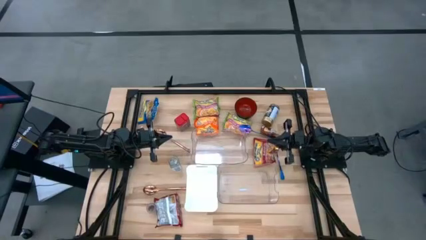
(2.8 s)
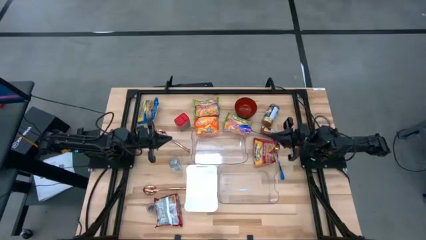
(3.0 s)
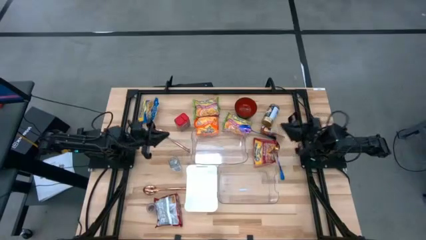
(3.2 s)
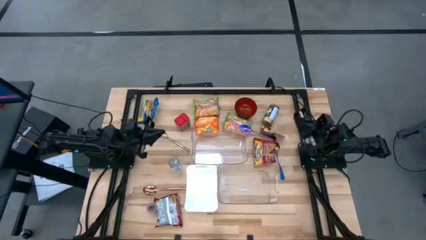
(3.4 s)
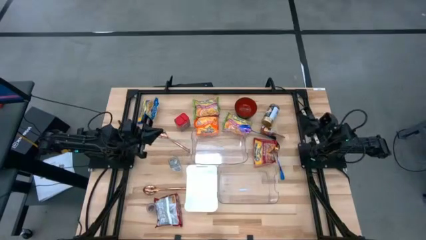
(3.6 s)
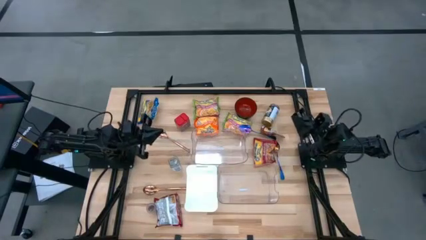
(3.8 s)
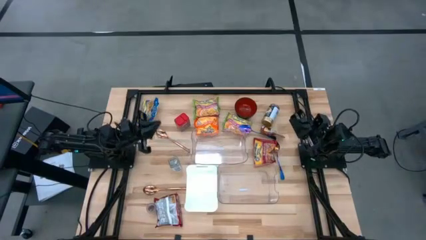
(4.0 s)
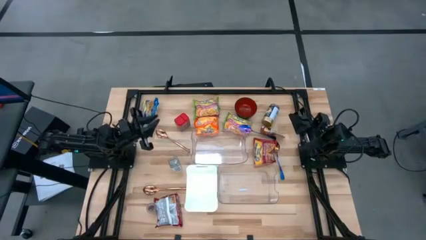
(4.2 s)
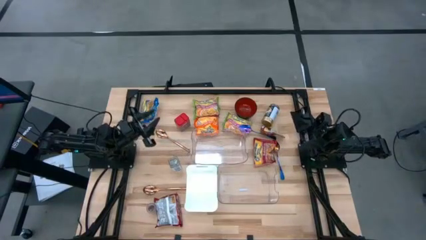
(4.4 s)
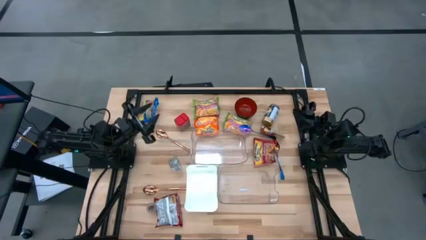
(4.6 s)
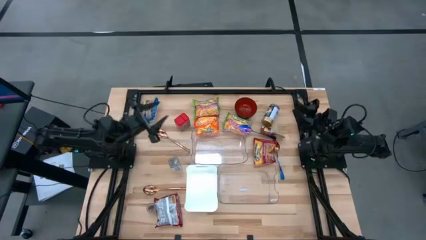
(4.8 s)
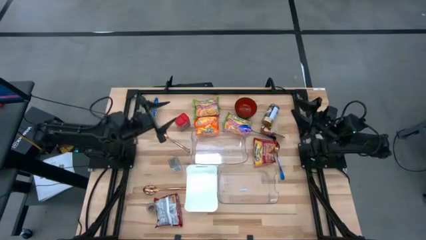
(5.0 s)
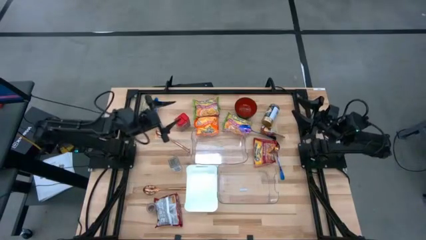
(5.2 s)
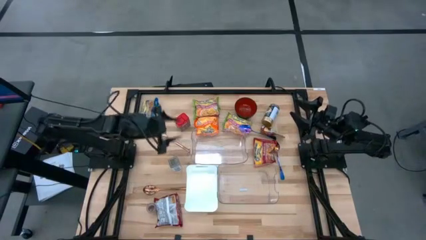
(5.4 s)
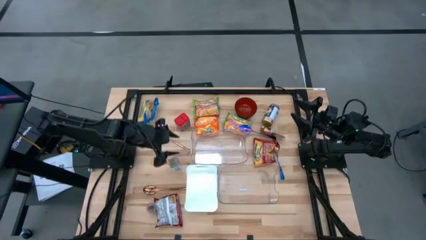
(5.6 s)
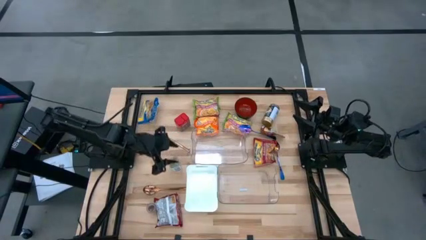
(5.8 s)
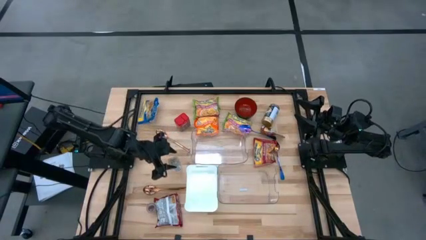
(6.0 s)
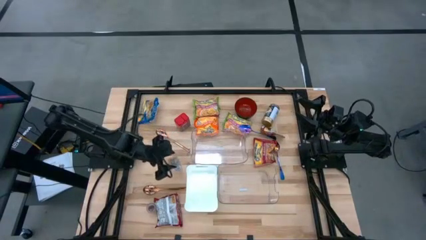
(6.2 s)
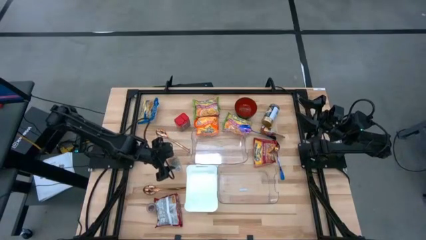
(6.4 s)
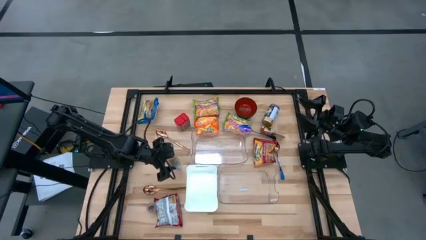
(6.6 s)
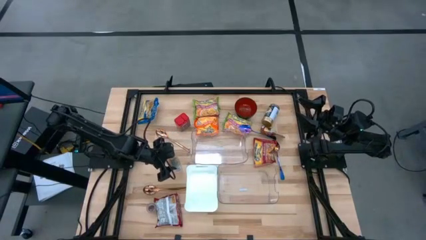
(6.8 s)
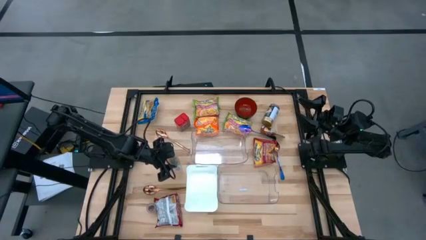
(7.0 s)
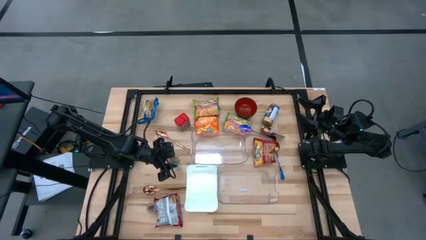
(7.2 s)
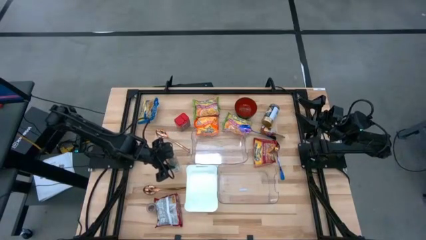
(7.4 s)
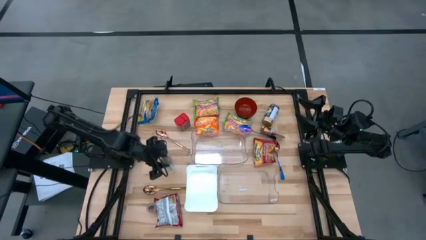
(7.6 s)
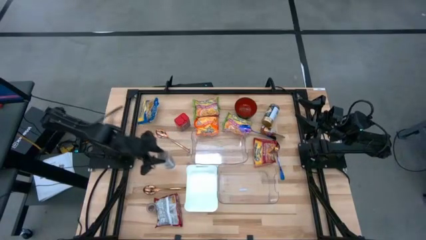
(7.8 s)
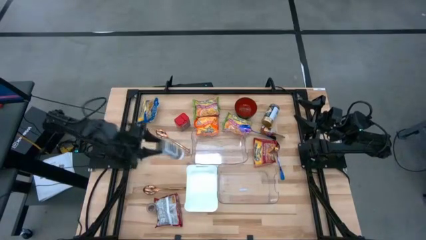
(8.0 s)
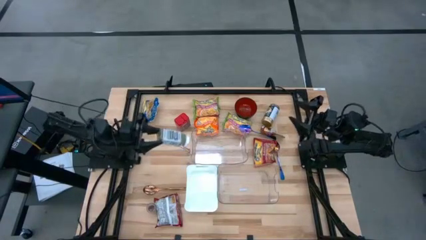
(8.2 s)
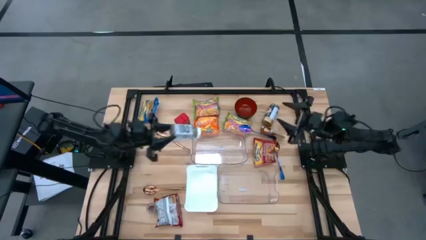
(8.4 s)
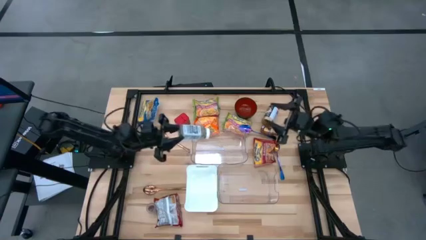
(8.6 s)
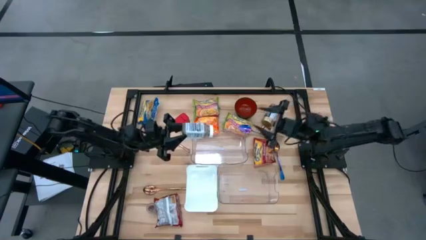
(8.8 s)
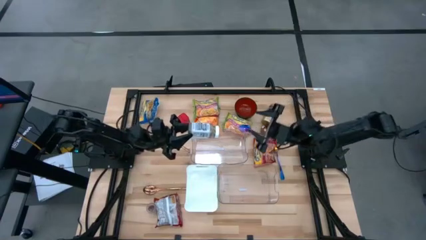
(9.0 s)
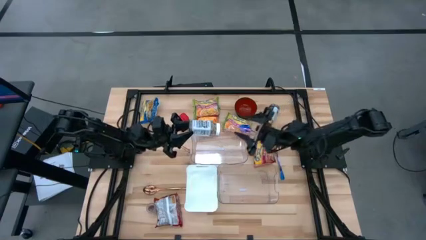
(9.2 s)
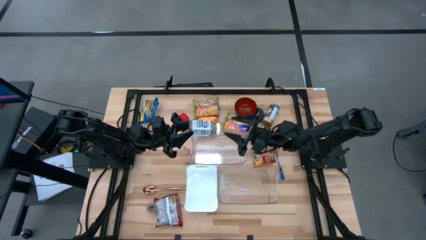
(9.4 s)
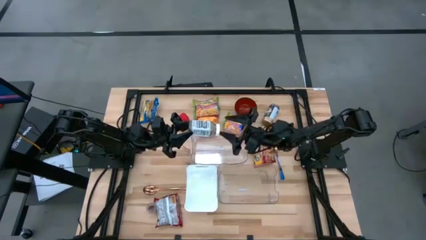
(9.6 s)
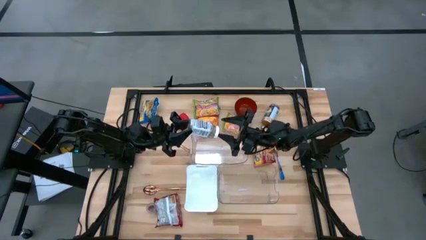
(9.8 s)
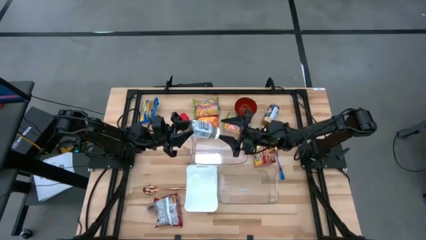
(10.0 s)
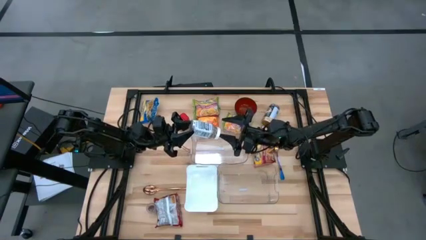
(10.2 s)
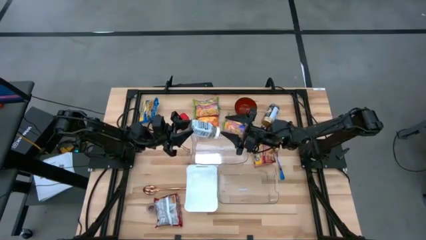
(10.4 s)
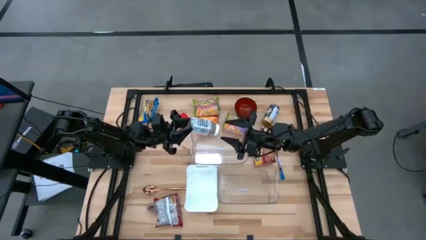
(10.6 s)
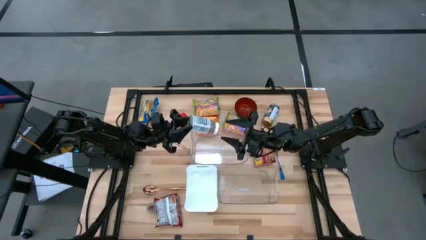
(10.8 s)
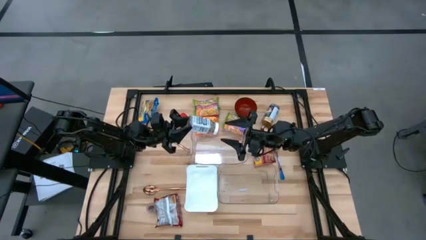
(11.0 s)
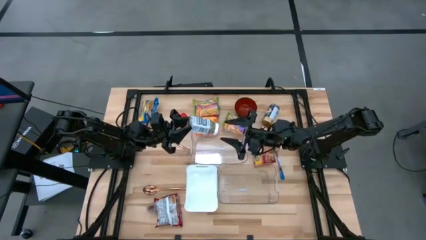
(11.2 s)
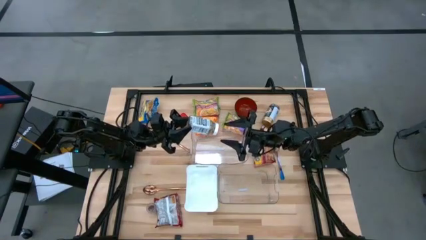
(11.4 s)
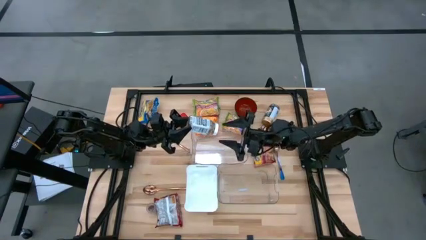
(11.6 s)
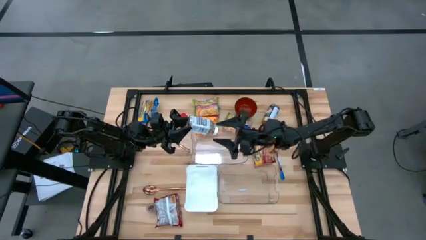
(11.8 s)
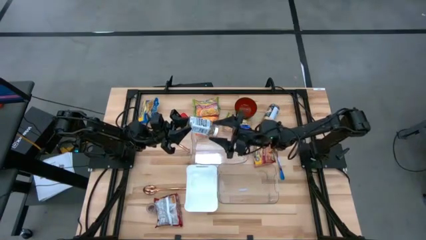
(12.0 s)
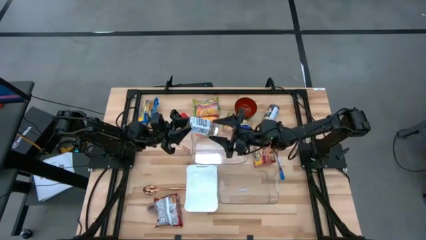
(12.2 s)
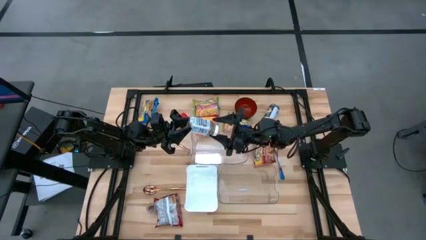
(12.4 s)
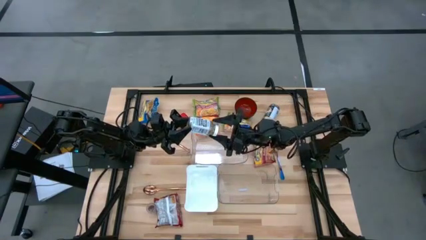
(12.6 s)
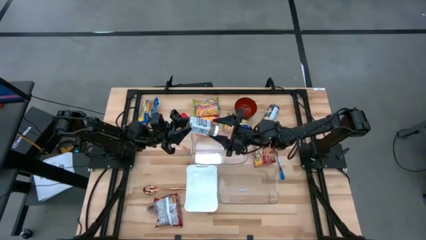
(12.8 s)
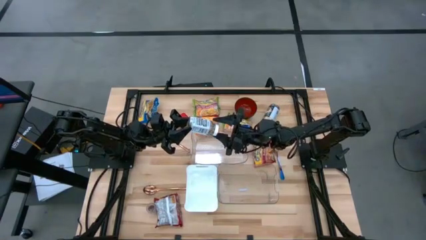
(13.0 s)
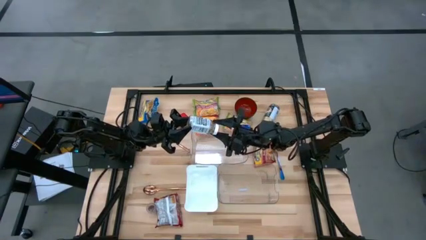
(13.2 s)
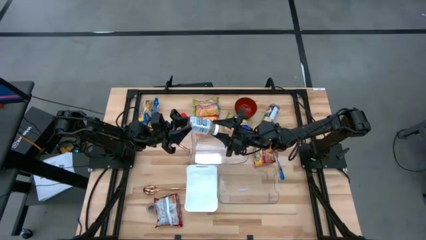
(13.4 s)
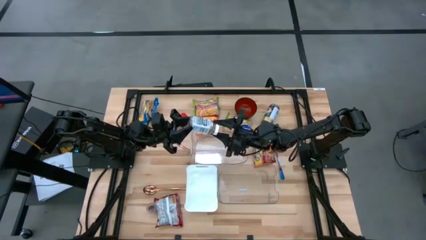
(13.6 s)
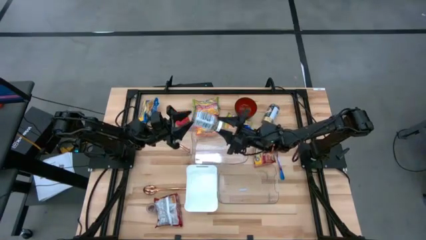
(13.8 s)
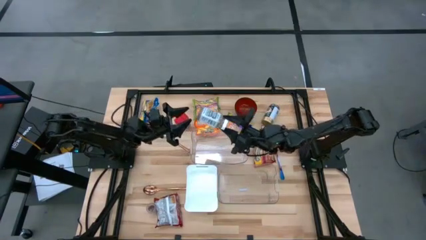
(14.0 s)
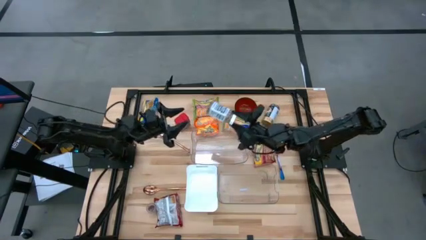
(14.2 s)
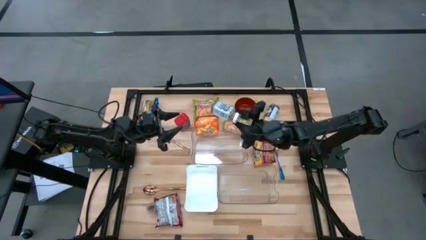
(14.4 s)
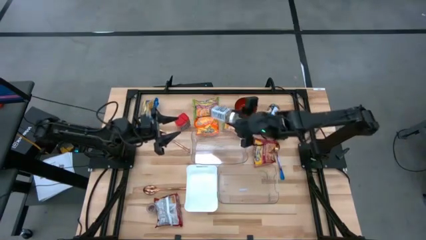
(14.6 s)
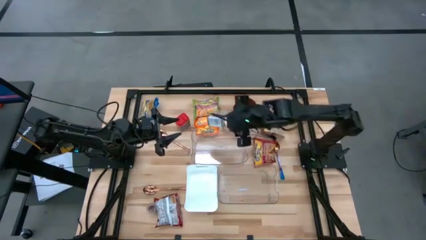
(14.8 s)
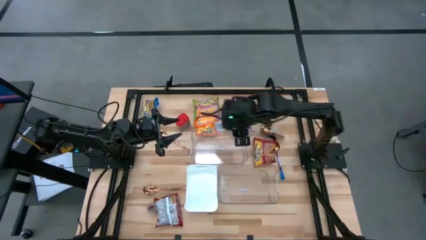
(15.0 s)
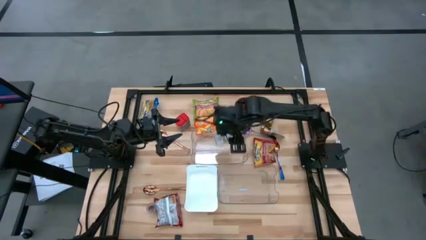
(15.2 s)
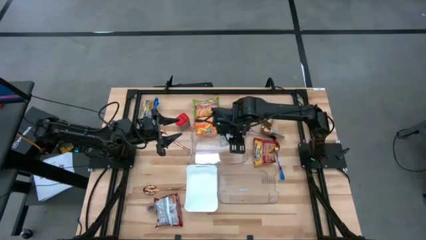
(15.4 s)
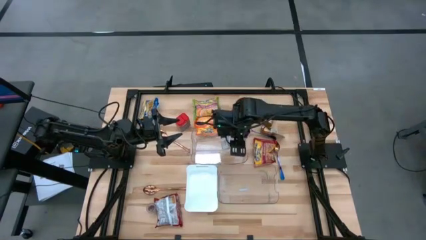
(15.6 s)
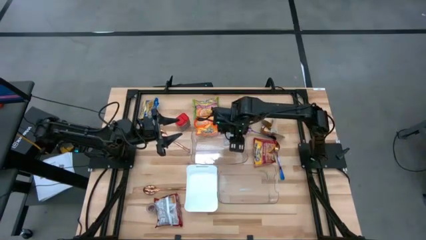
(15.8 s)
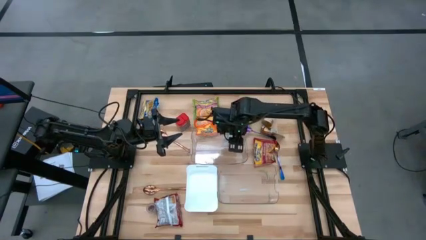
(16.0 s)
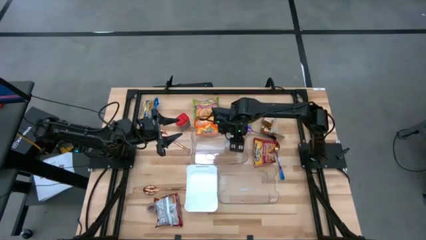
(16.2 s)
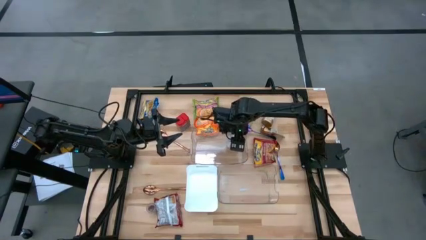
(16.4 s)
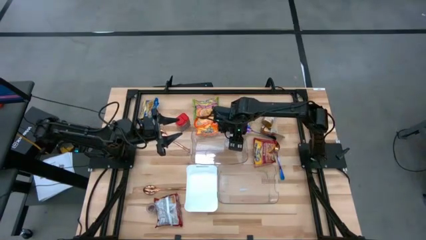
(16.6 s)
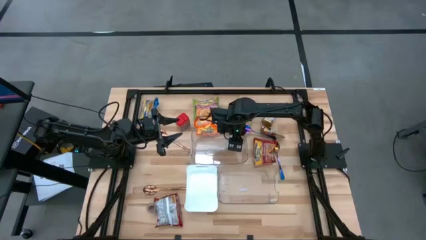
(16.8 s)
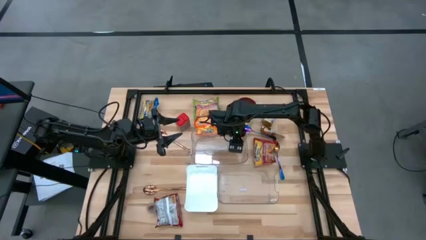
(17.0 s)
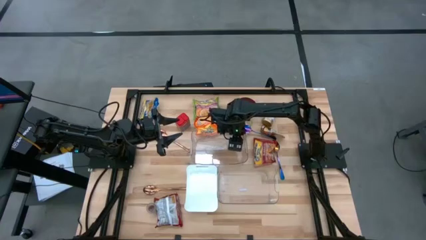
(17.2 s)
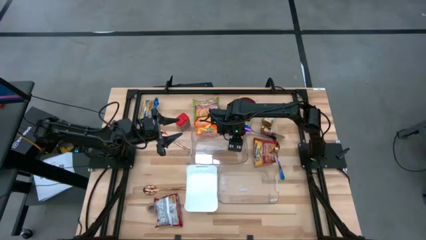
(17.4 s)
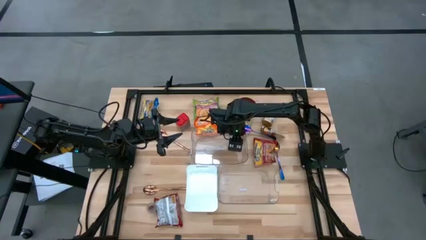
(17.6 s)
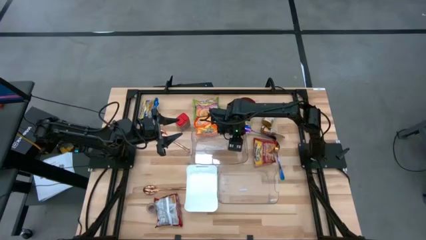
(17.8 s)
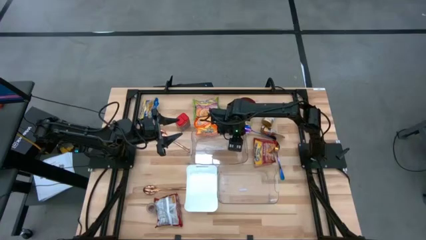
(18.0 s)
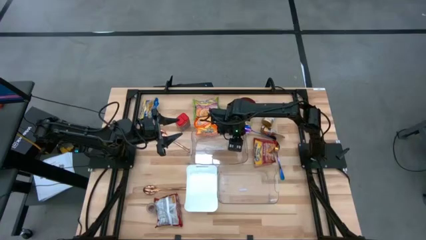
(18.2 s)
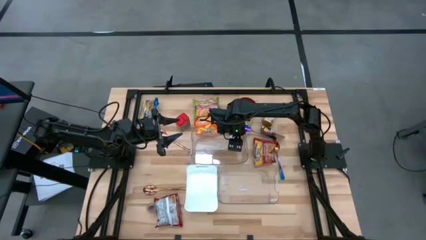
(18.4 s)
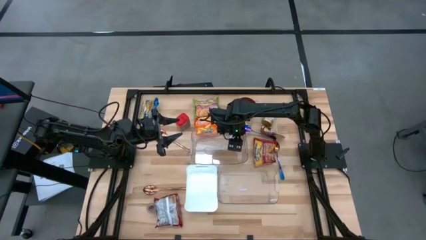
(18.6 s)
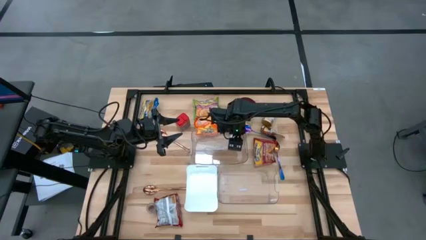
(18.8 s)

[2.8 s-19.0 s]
Task: Pick & Place Food Item
Put the white spice bottle into the top transparent bin
